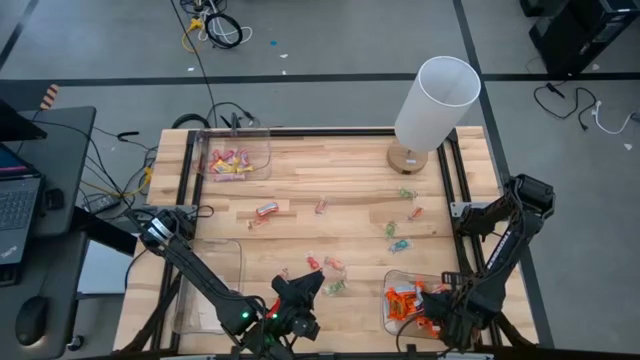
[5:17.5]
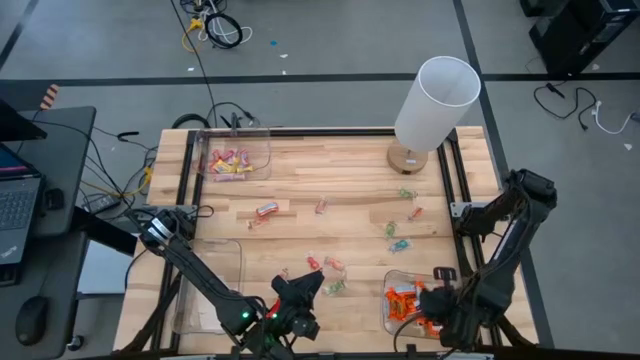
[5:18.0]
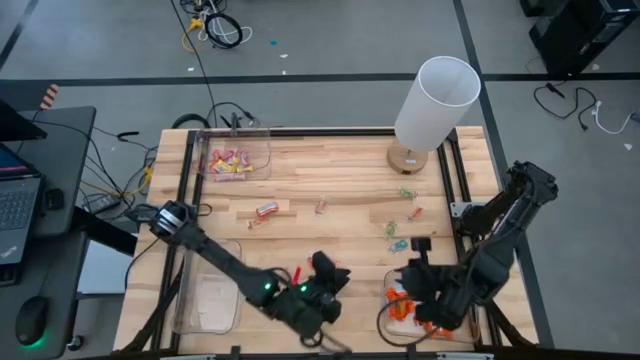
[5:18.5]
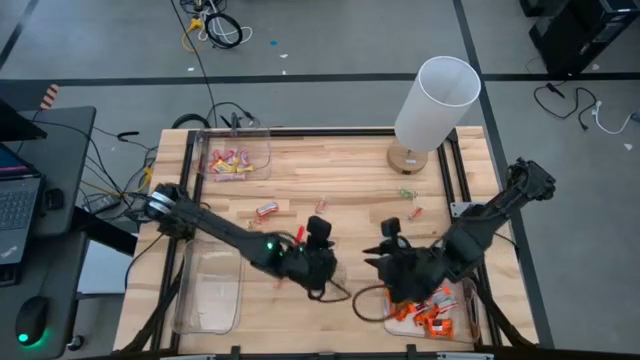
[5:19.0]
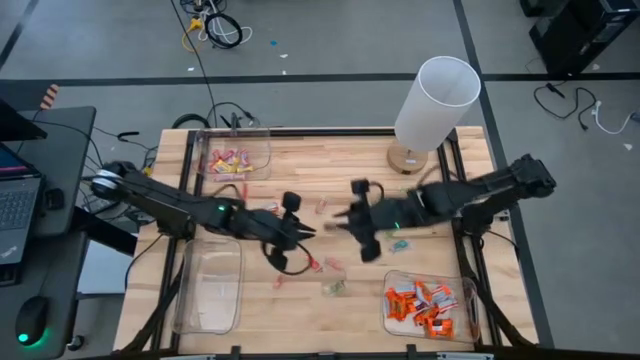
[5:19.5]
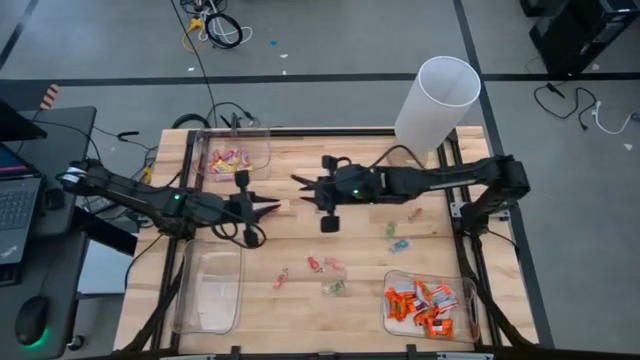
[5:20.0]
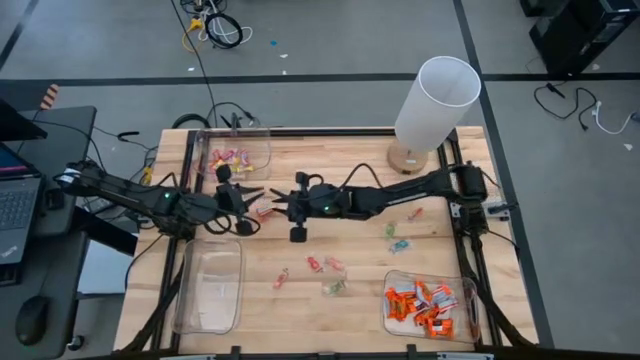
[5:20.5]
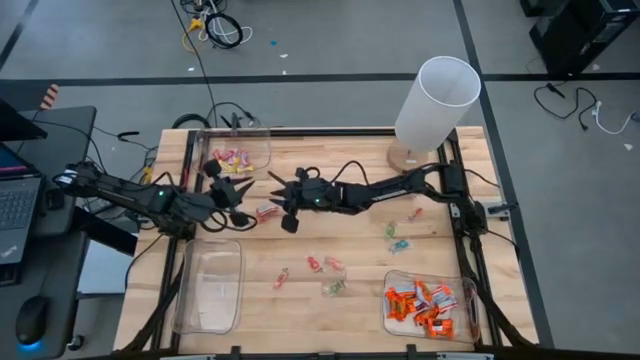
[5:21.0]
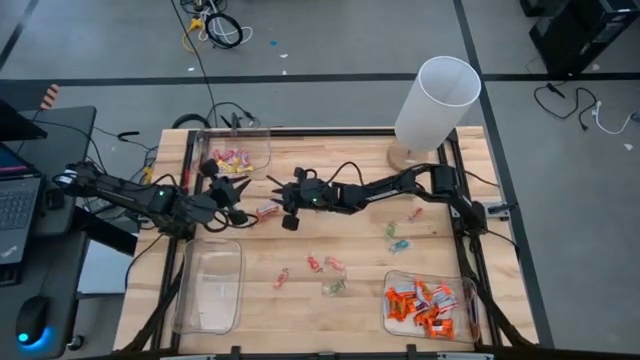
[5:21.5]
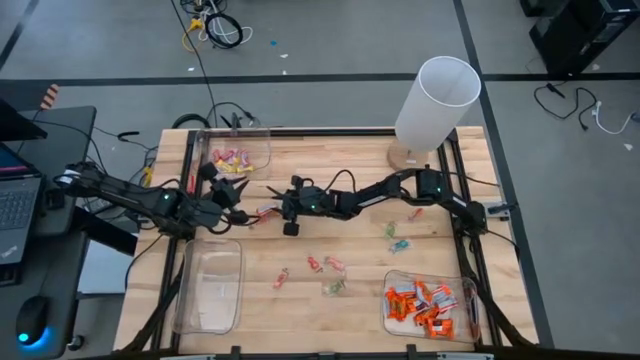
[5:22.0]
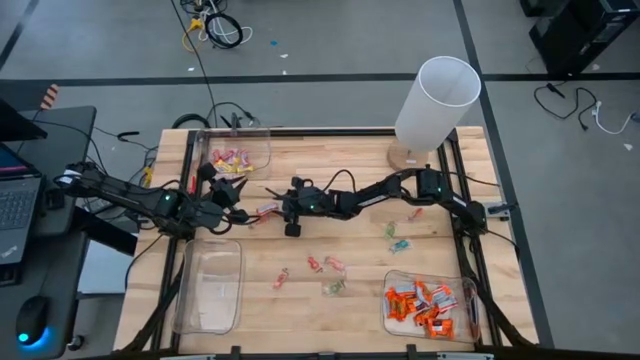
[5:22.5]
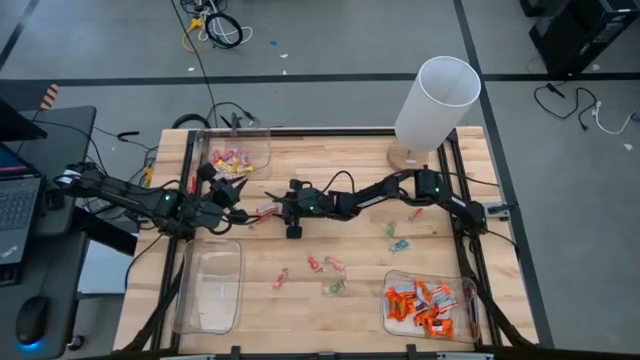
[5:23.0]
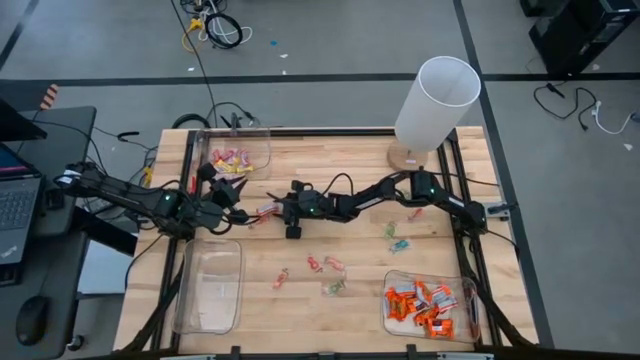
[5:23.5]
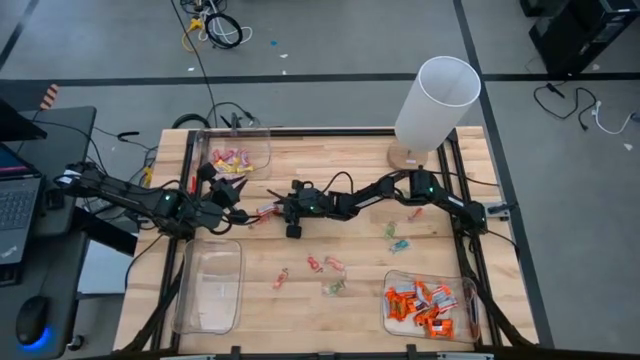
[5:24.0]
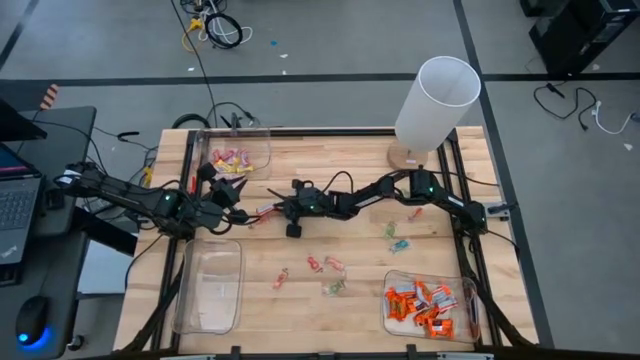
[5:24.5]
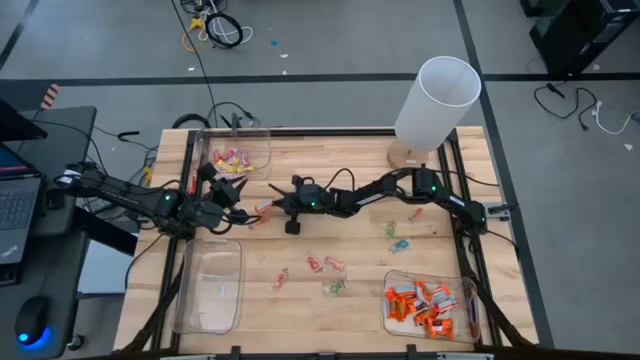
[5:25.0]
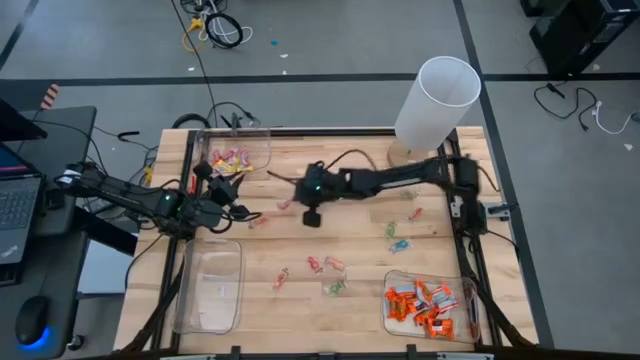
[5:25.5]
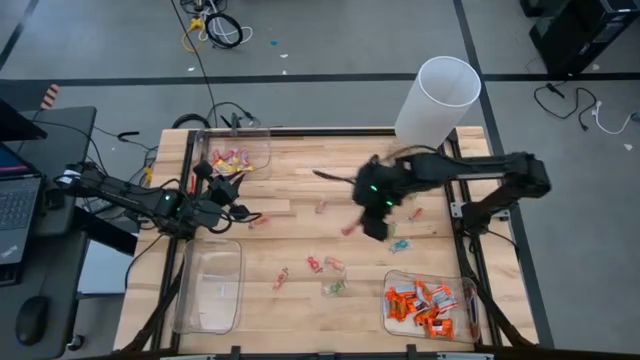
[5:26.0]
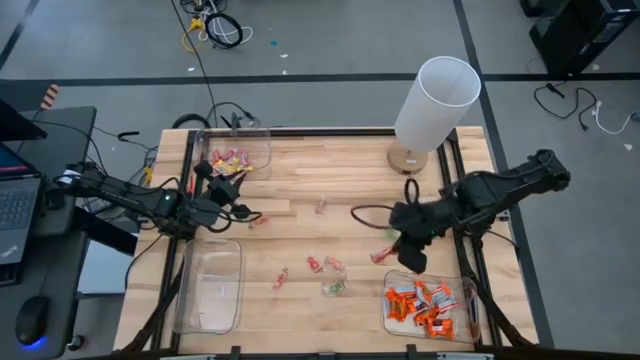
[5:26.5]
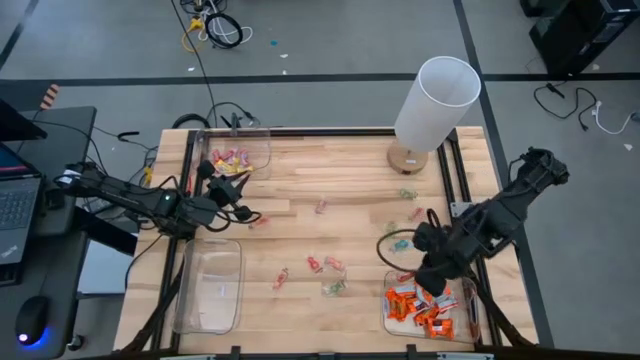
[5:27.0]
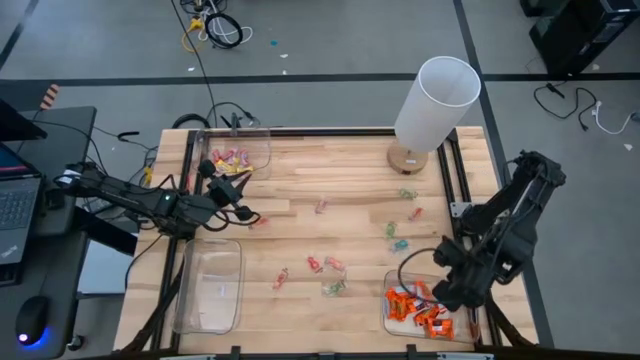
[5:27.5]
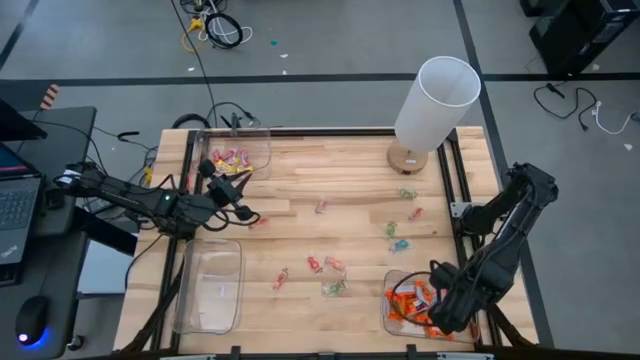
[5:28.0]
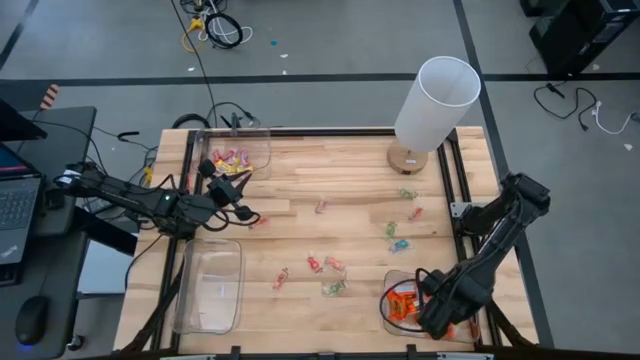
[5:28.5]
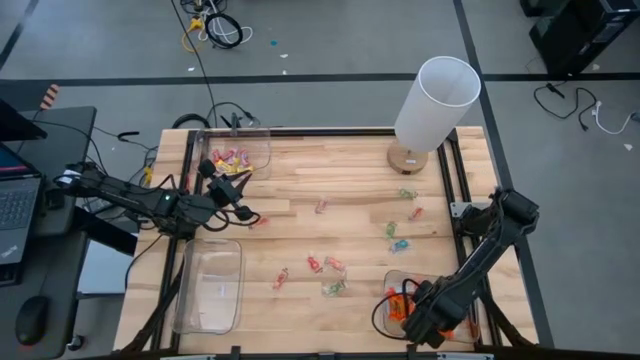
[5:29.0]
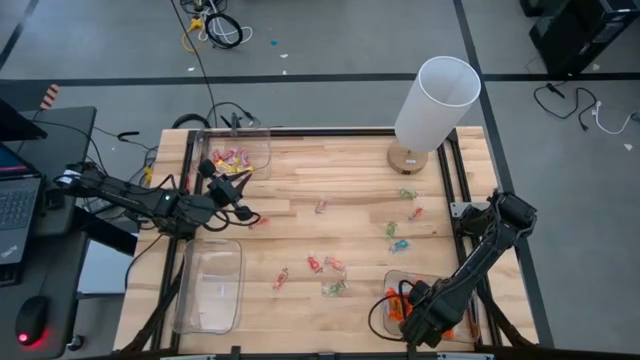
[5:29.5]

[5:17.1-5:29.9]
Task: Sort candy
Put the chocolate into the bottom right transparent bin

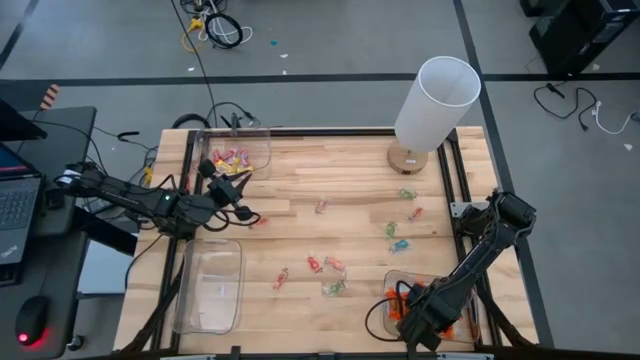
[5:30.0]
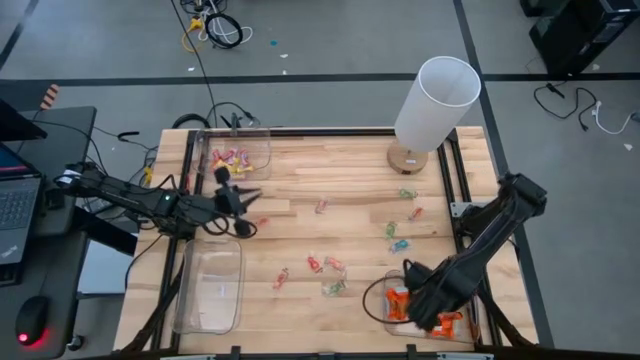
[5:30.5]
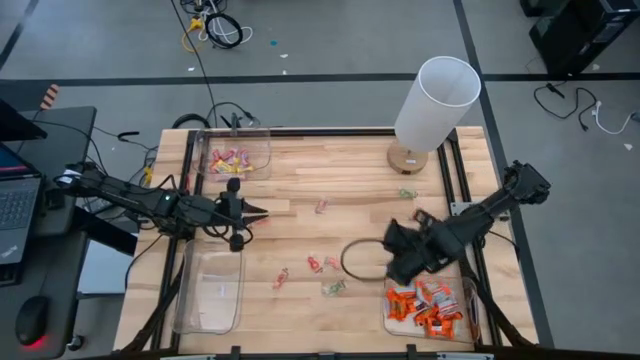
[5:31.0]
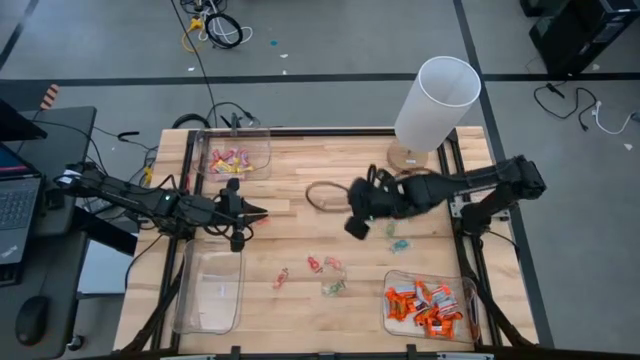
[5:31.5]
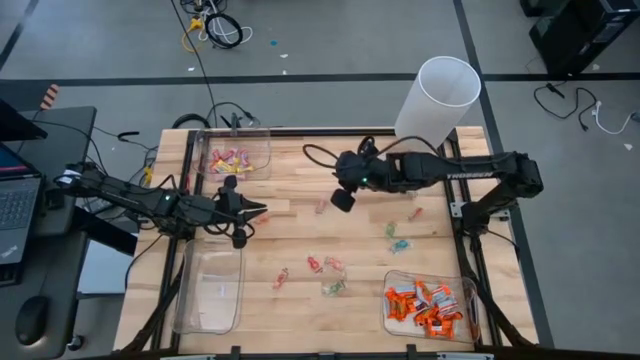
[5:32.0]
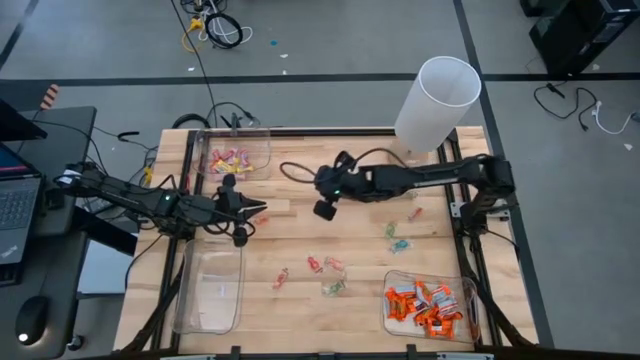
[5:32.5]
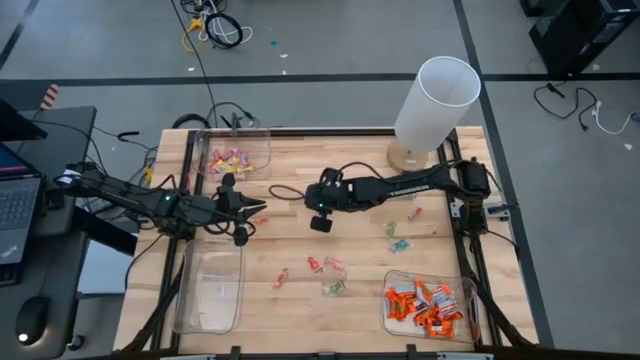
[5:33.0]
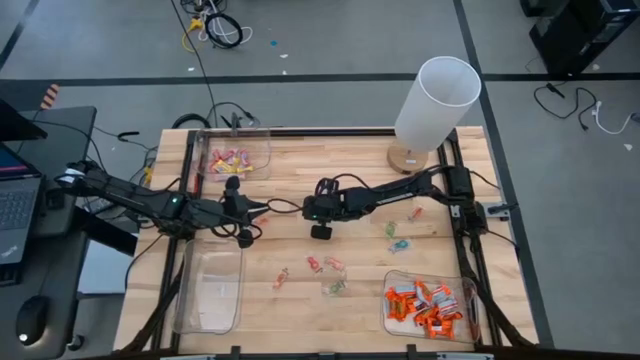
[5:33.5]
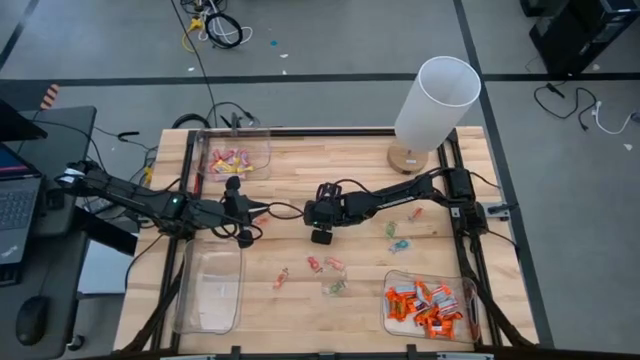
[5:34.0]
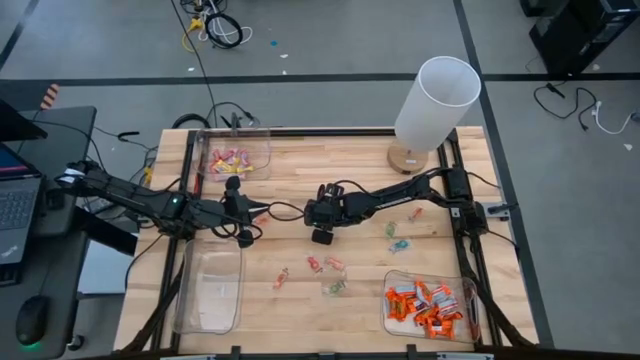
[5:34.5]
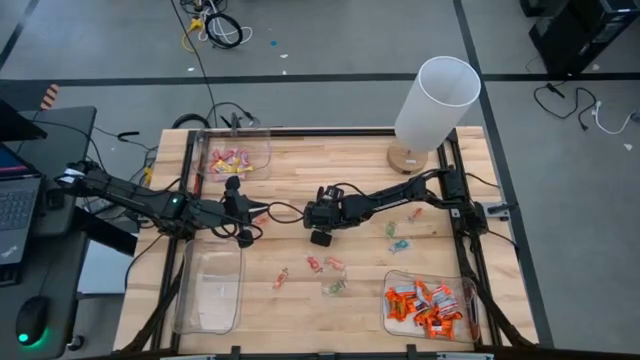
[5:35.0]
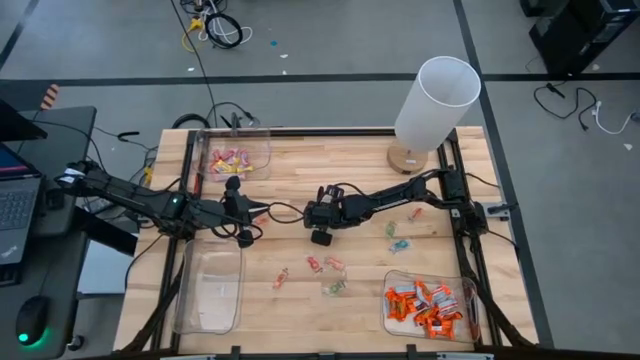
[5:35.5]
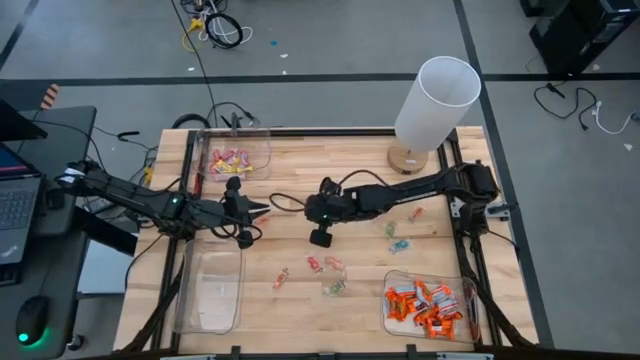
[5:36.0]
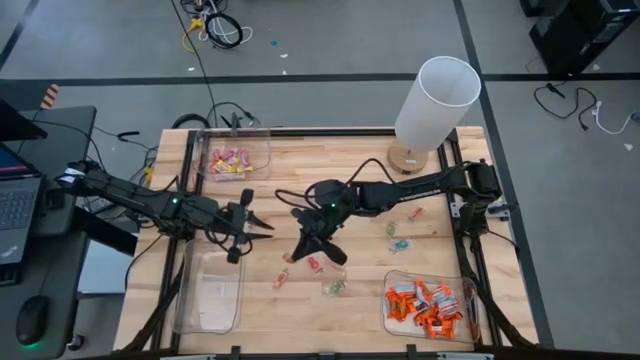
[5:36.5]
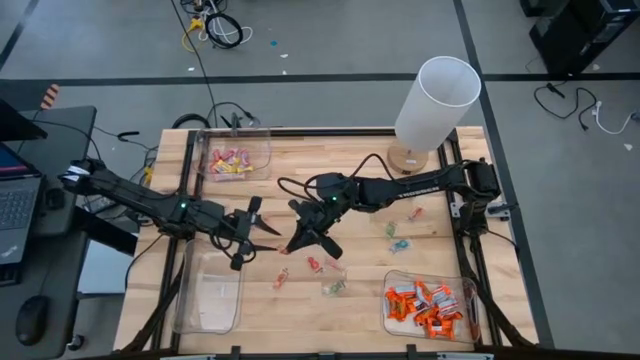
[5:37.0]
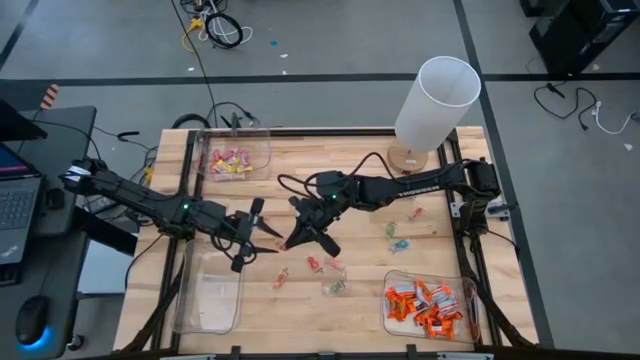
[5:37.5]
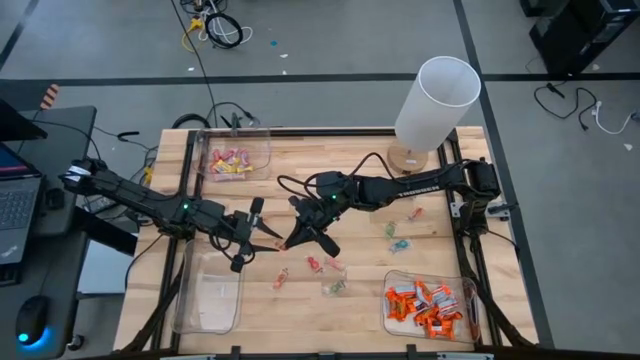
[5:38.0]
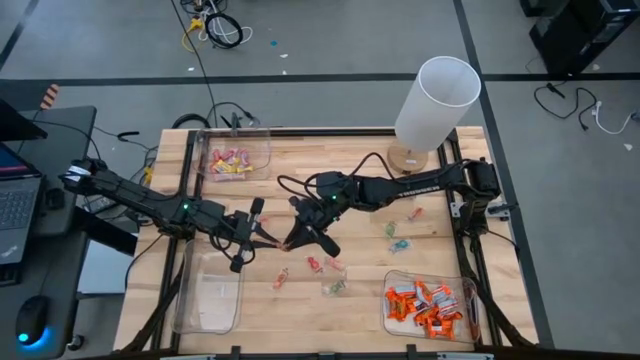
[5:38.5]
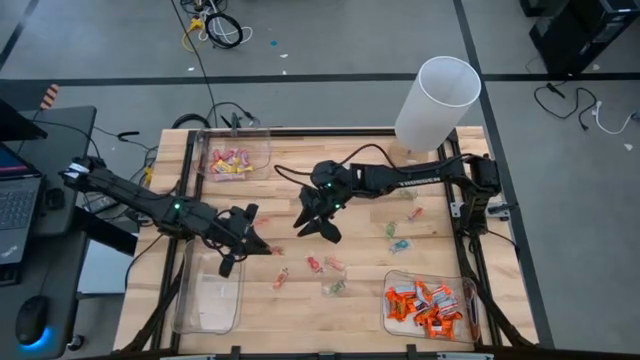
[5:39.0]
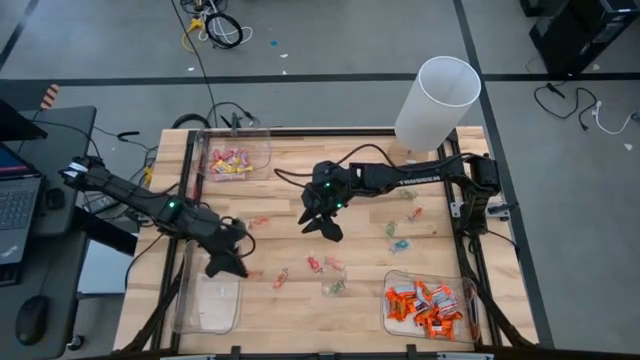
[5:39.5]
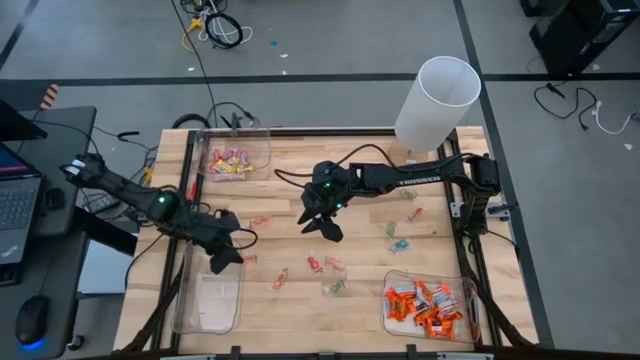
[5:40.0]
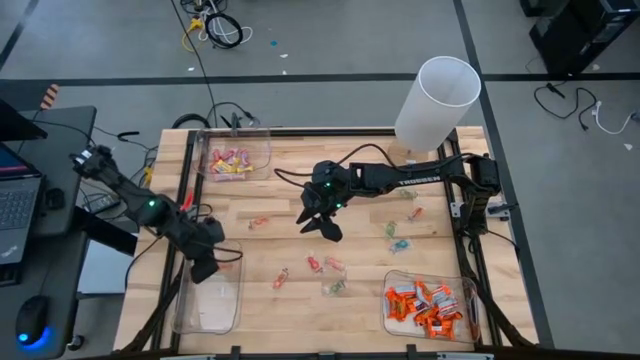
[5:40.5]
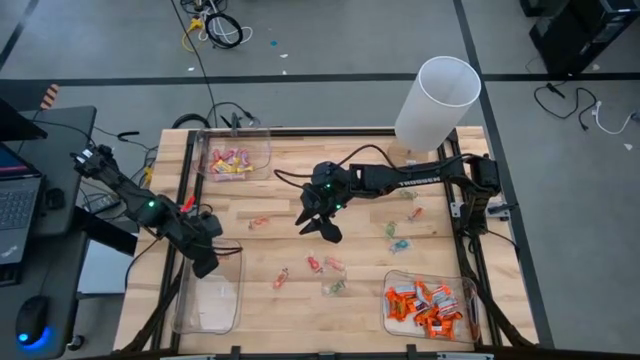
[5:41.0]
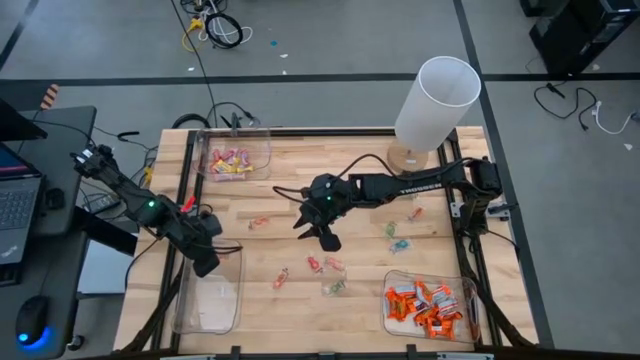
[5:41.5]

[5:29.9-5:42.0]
Put the orange gummy into the bottom left transparent bin
